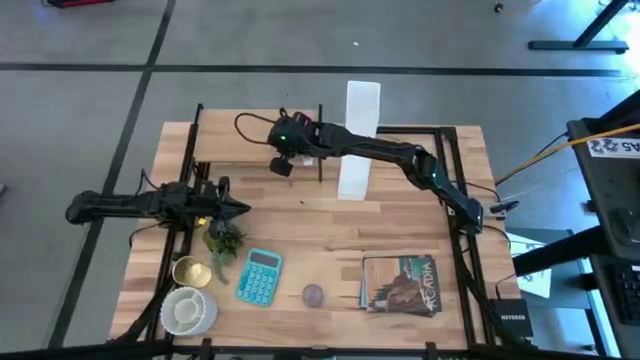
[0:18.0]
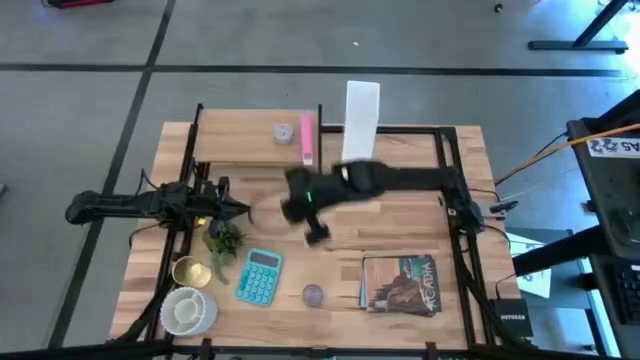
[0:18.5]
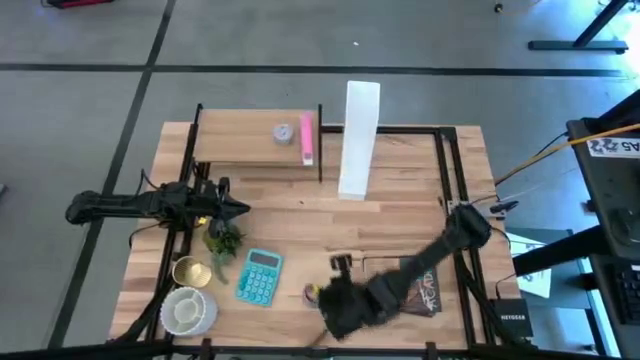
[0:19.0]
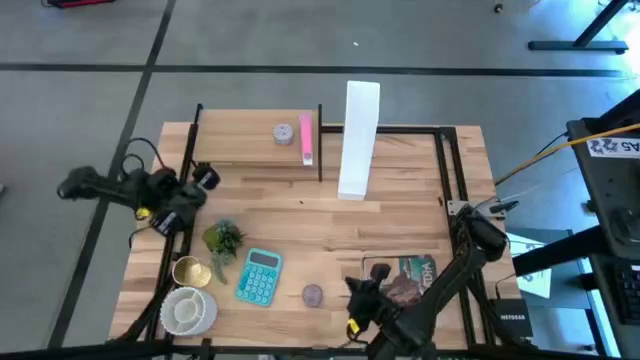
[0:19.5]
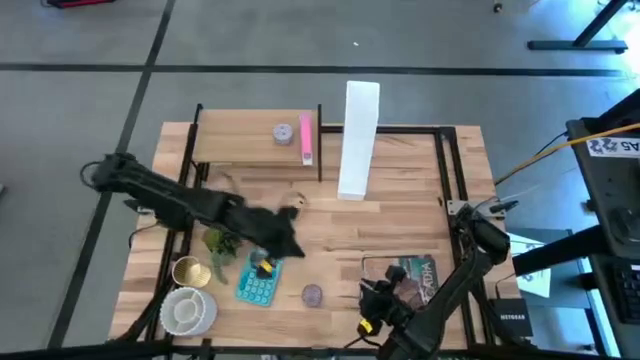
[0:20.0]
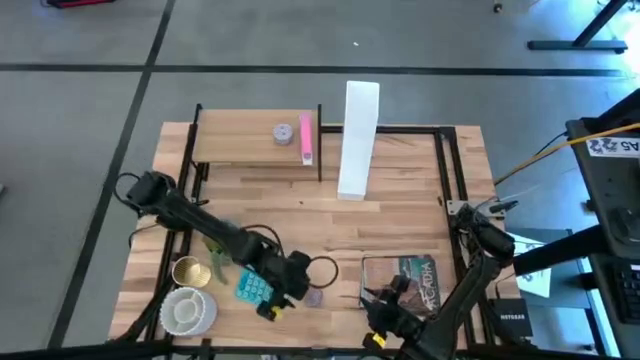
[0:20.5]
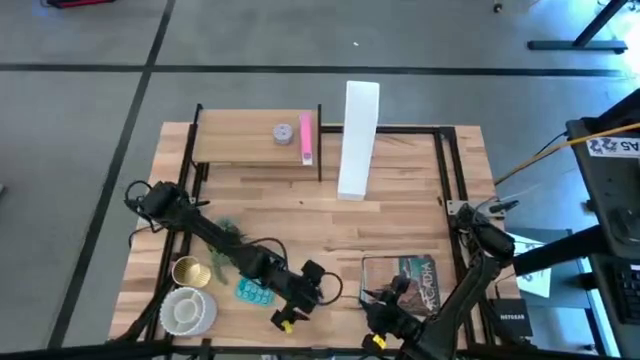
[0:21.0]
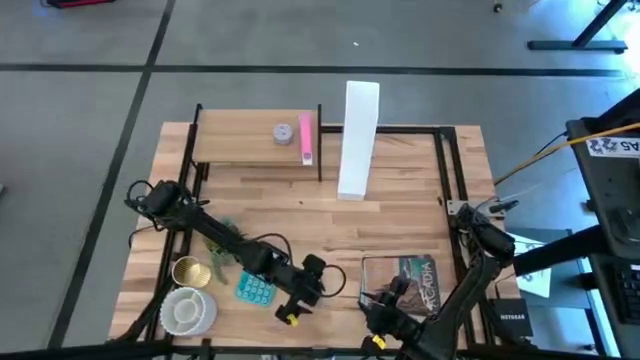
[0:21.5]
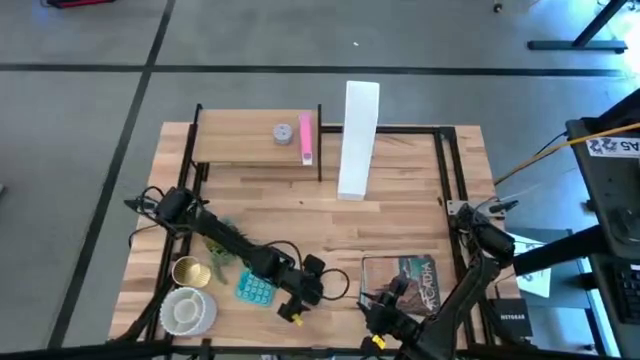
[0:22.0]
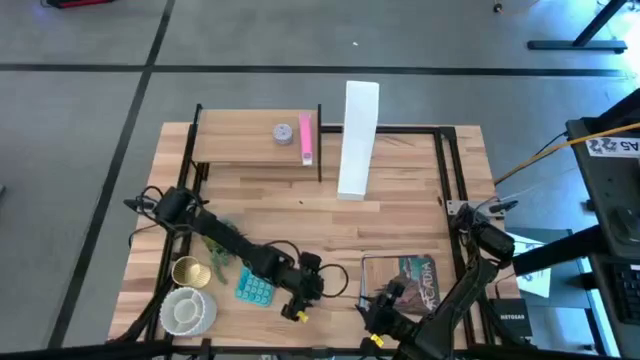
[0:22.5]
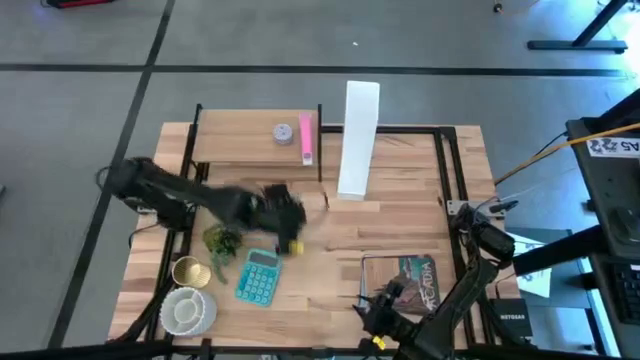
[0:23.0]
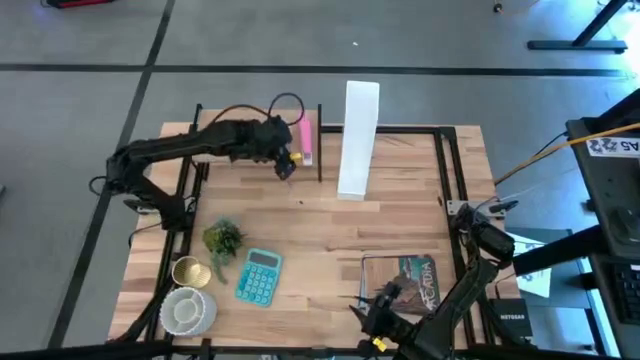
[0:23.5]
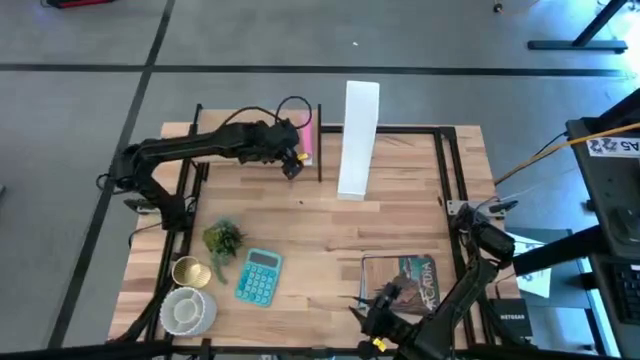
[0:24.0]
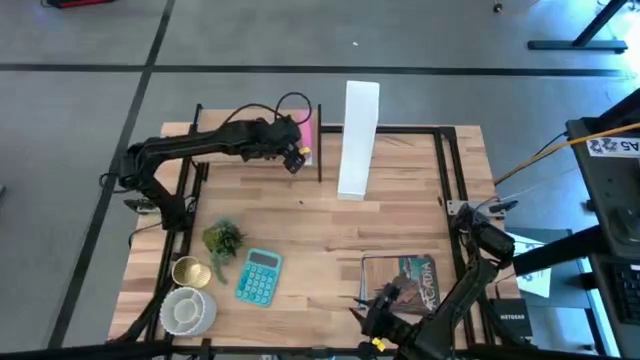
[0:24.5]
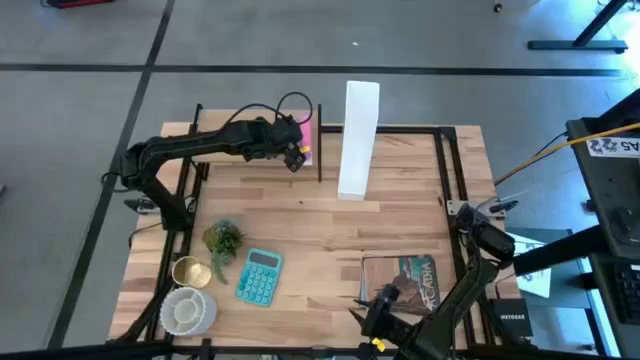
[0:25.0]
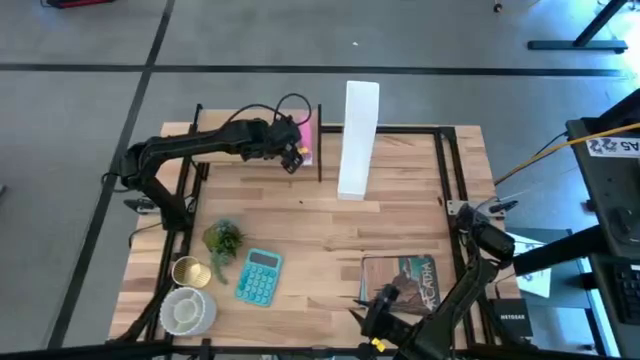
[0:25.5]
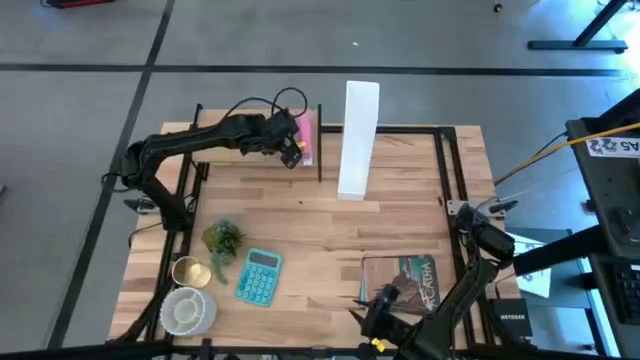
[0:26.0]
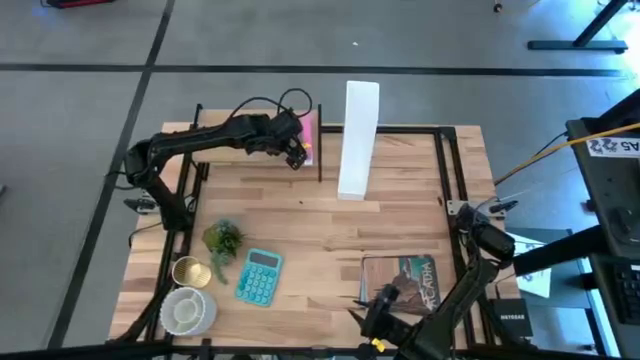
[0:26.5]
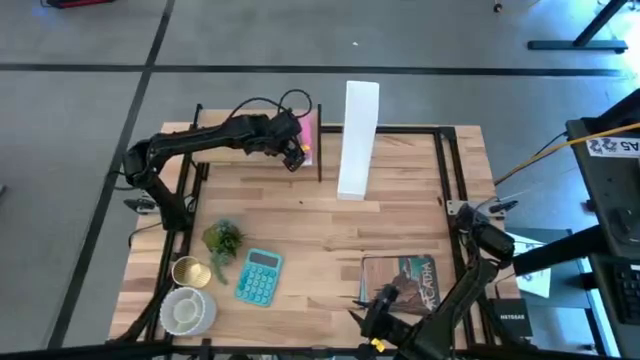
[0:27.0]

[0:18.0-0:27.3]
Task: Stock shelves
Put the red patterned scented candle on the shelf

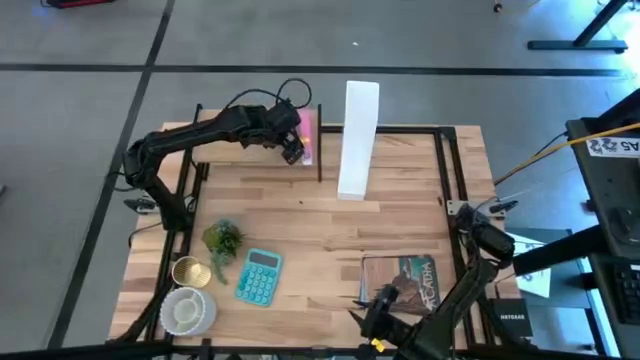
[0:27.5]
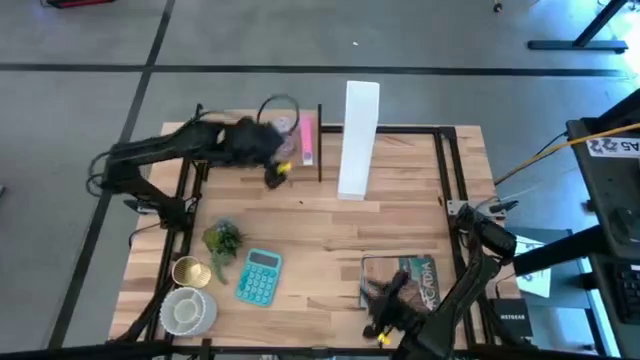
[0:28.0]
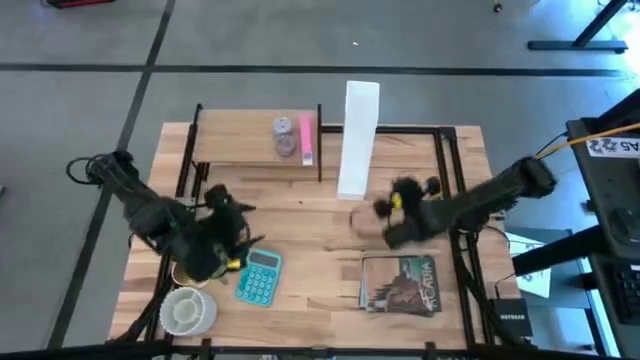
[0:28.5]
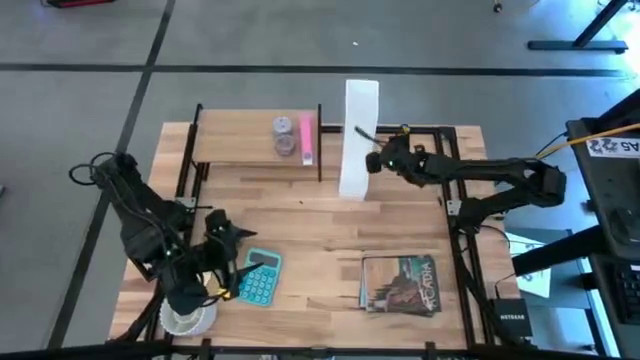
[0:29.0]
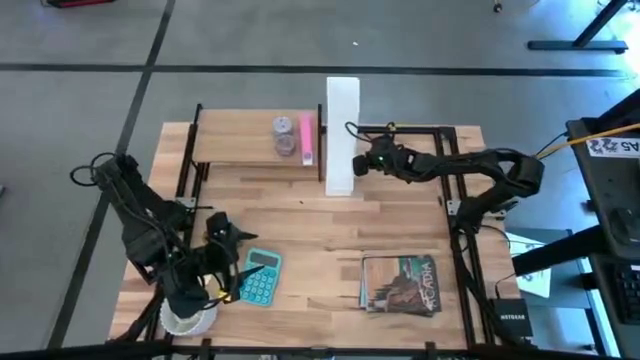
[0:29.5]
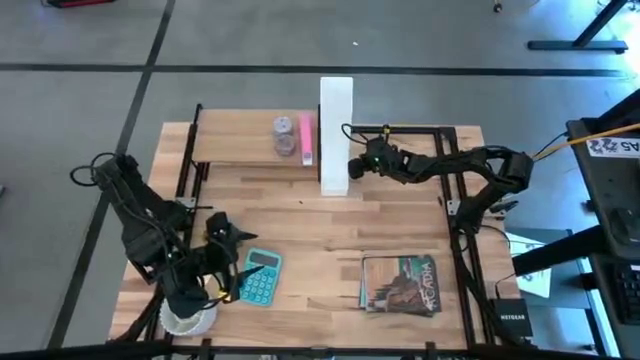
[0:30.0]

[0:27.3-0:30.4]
Adjust the white bookshelf

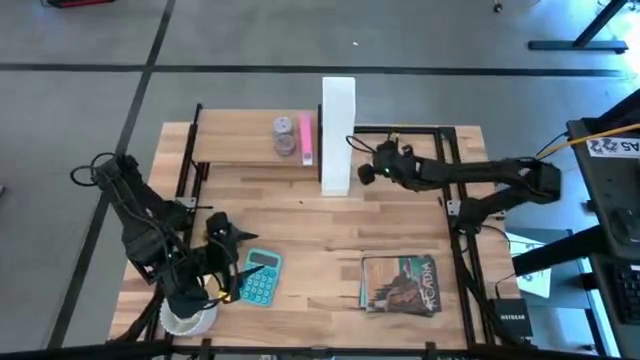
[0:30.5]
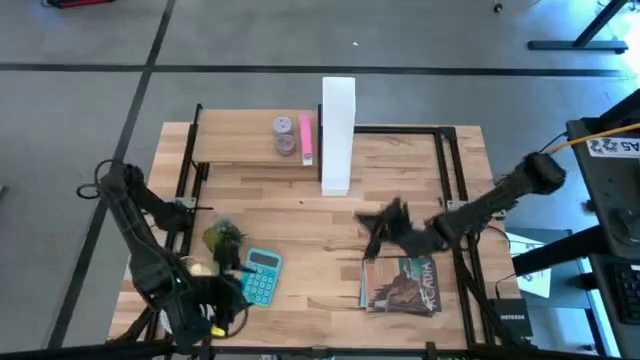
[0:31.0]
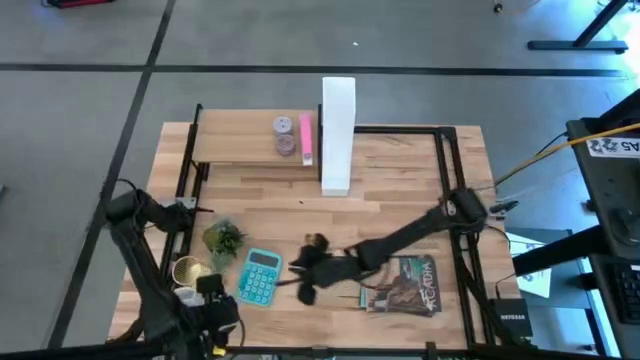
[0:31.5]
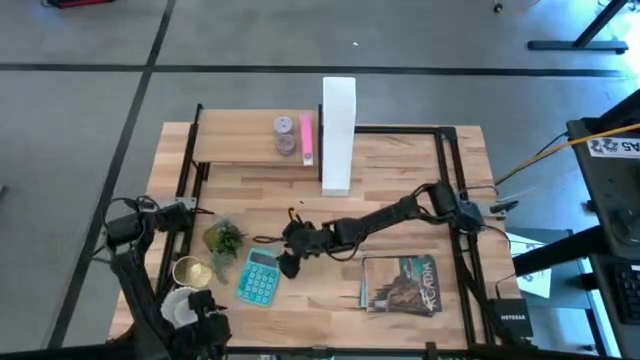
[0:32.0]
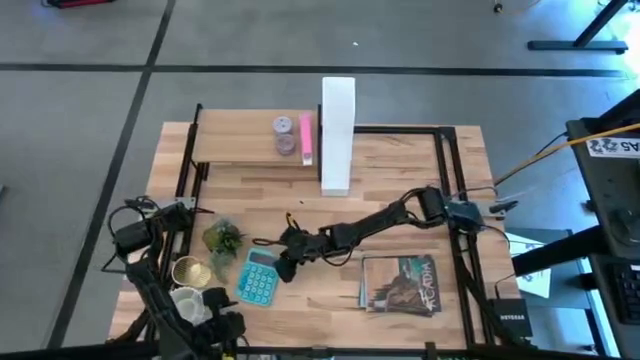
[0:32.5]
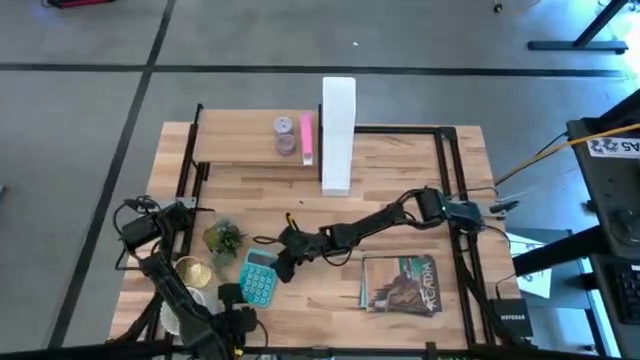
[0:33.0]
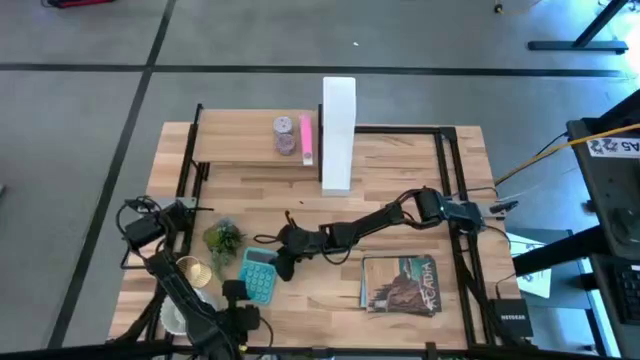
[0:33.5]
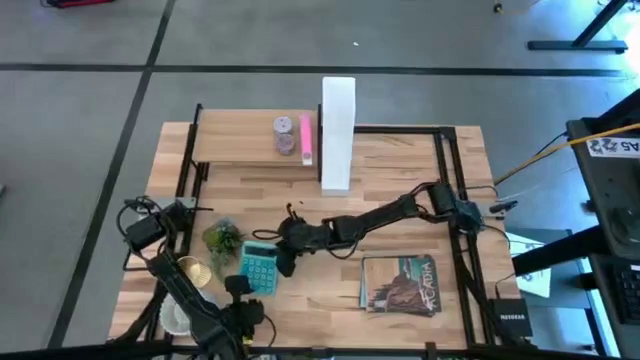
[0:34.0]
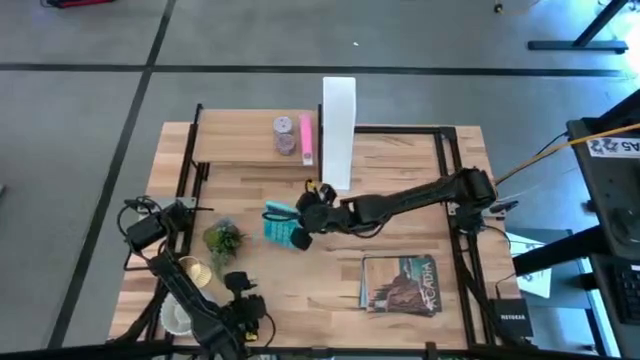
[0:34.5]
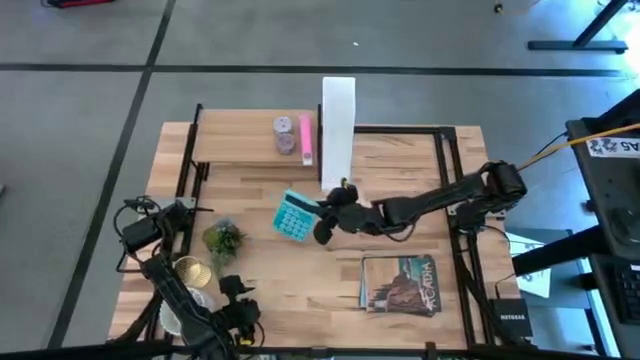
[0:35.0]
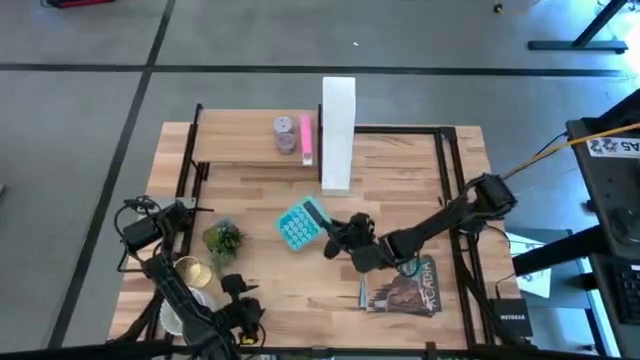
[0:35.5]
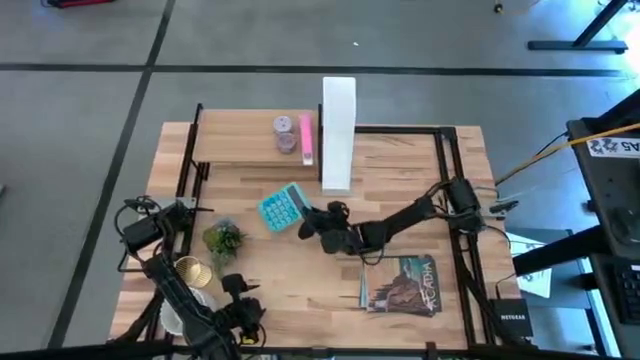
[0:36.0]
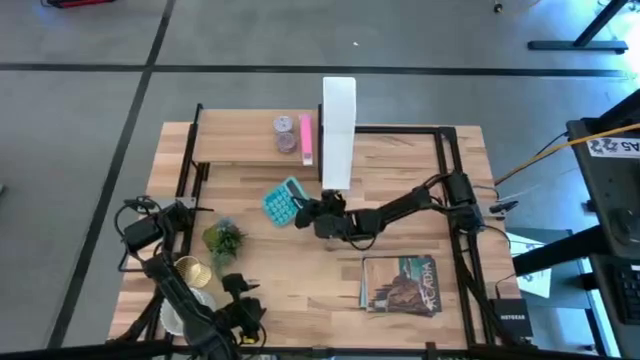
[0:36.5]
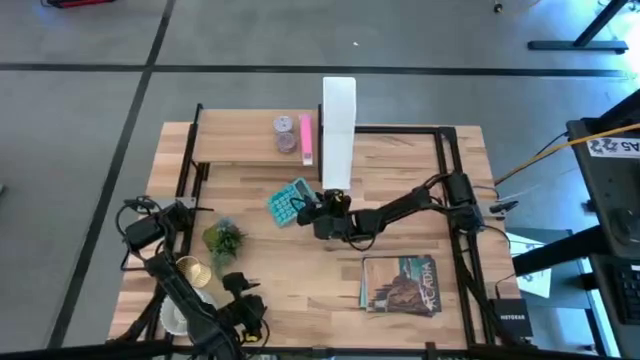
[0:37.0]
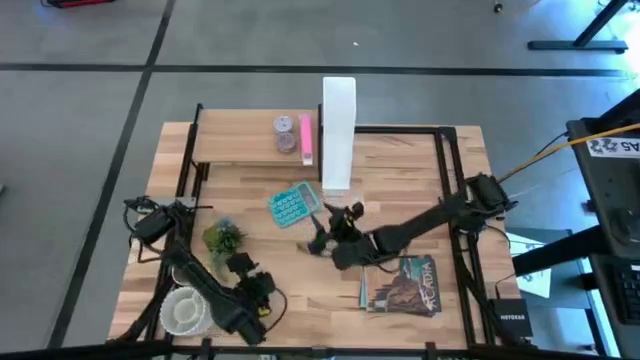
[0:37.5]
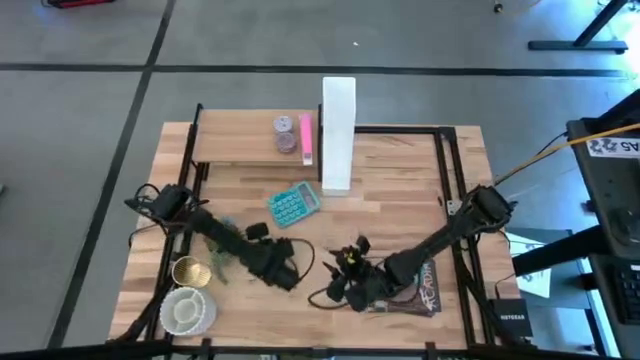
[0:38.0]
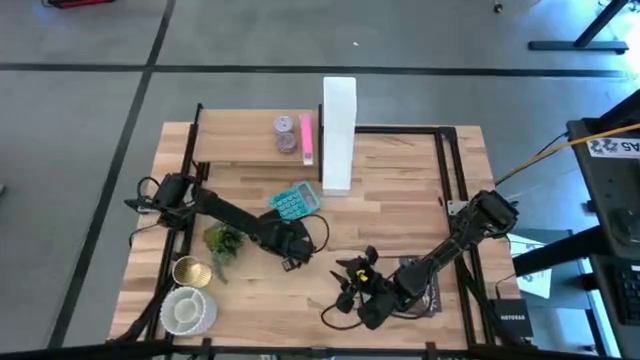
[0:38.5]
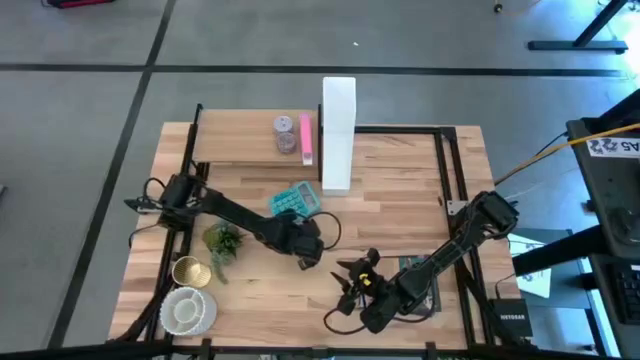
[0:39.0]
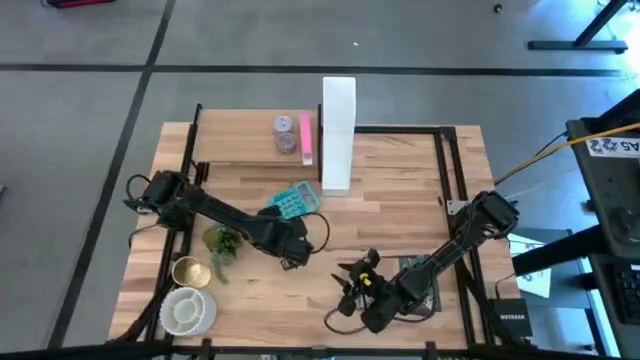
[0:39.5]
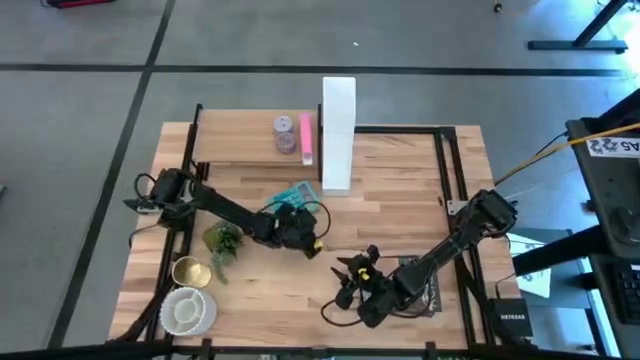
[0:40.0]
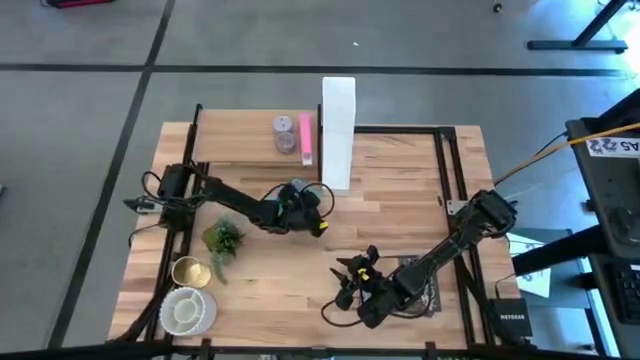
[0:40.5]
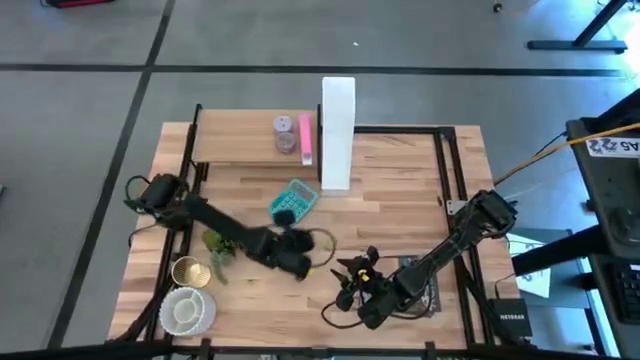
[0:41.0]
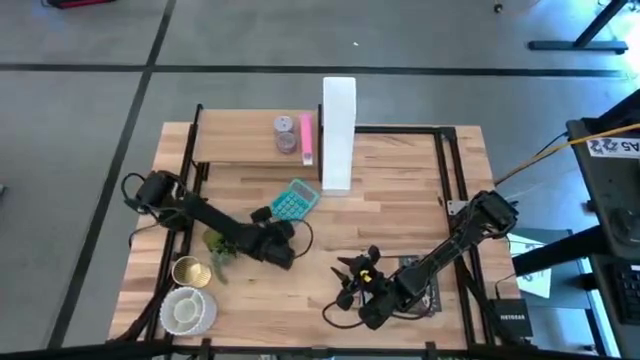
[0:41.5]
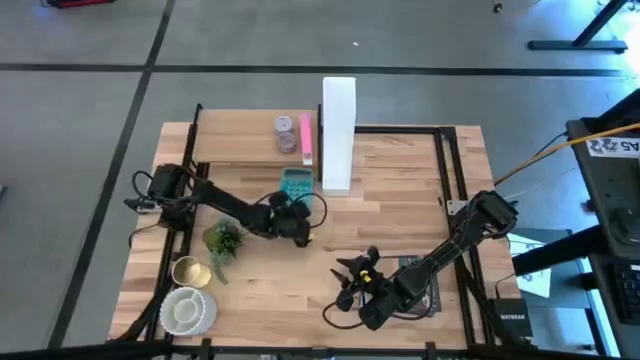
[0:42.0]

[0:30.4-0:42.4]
Put the blue calculator under the shelf
